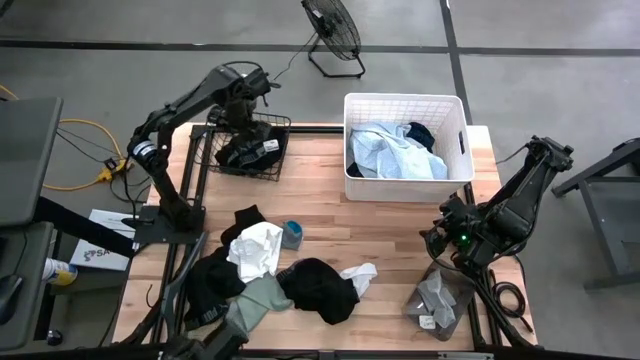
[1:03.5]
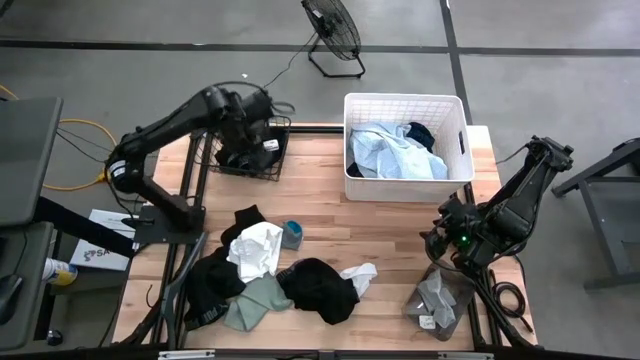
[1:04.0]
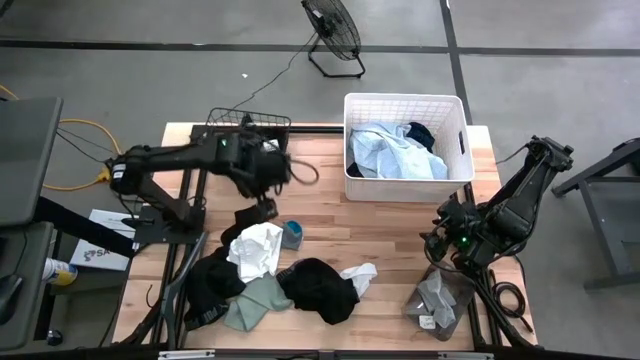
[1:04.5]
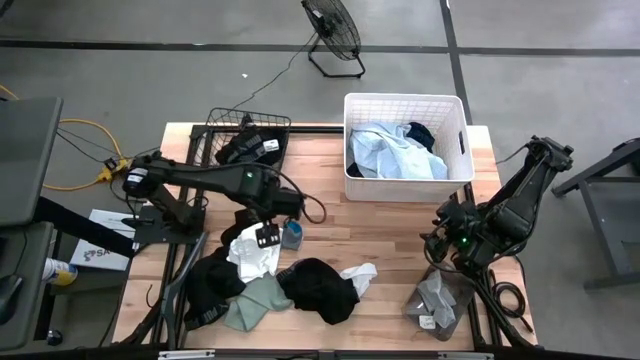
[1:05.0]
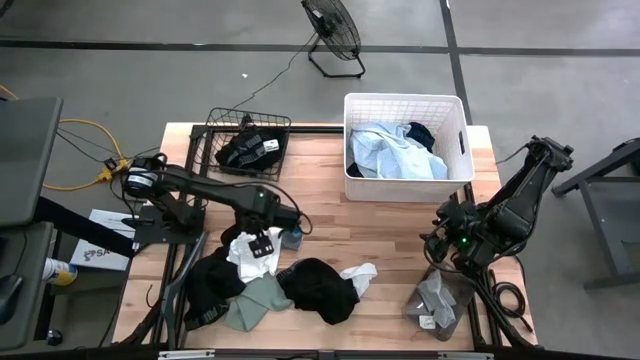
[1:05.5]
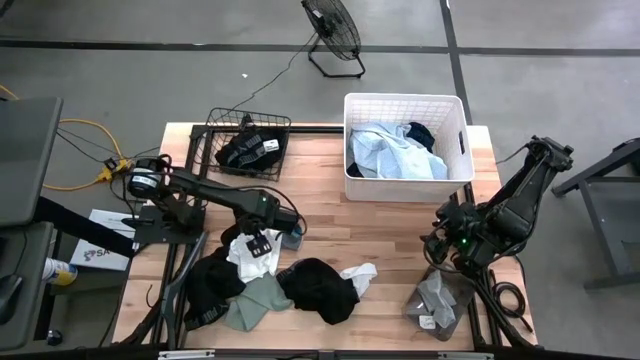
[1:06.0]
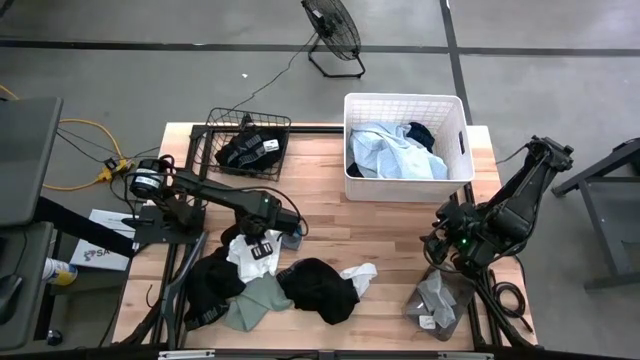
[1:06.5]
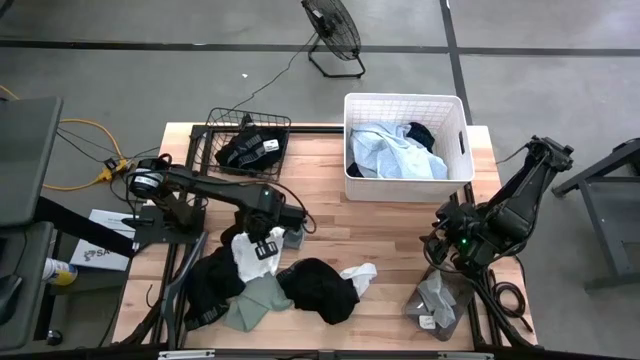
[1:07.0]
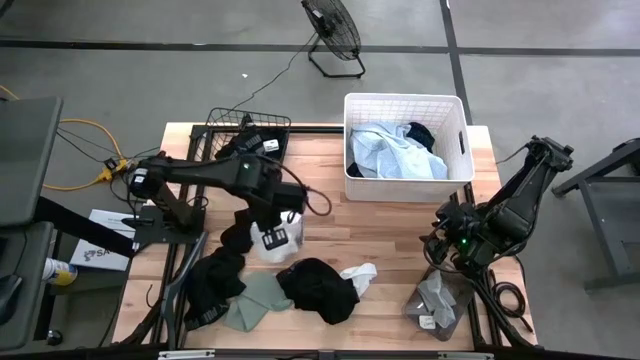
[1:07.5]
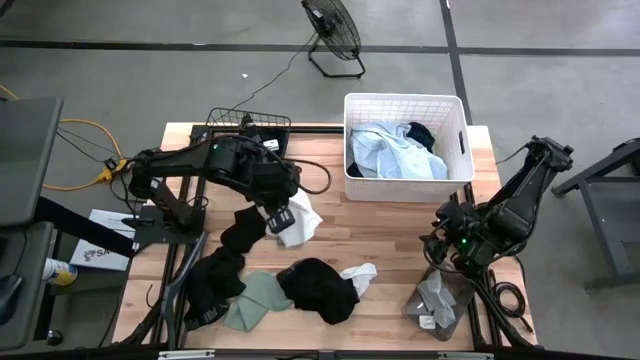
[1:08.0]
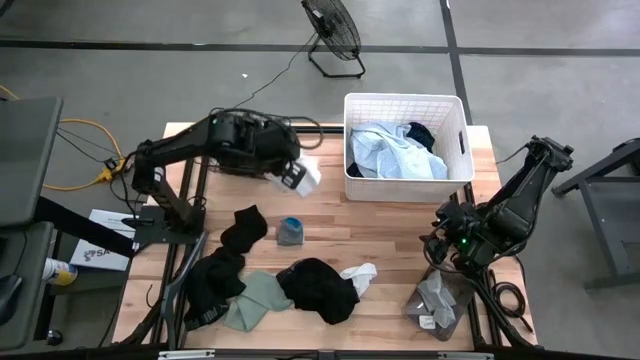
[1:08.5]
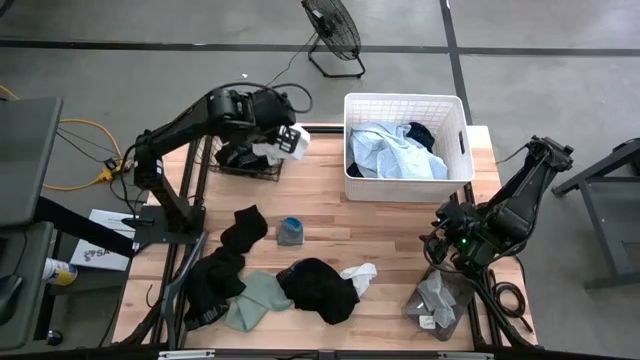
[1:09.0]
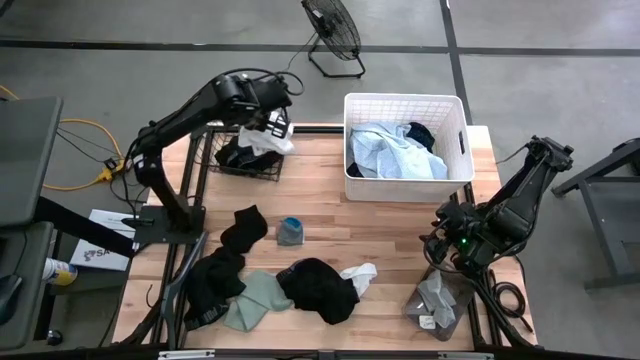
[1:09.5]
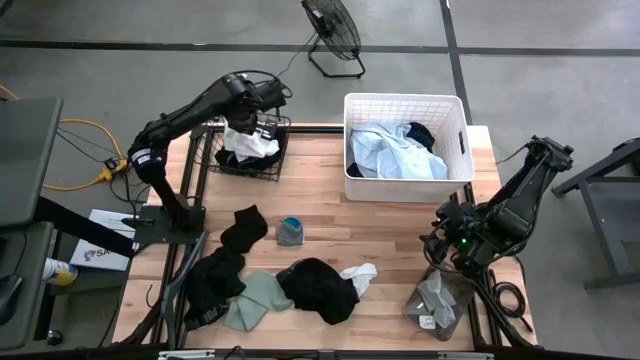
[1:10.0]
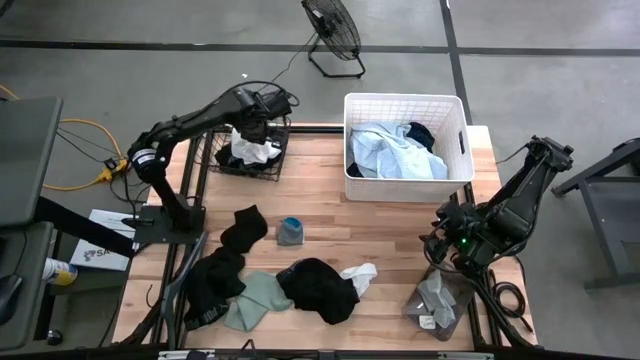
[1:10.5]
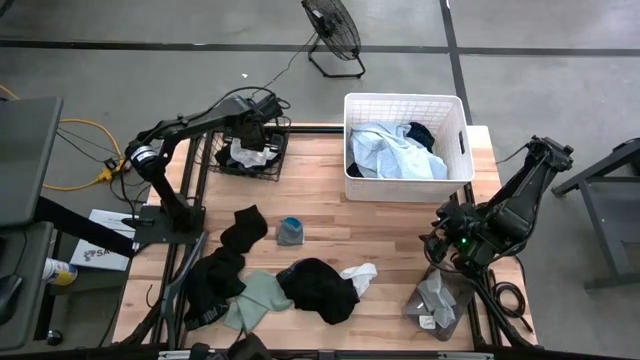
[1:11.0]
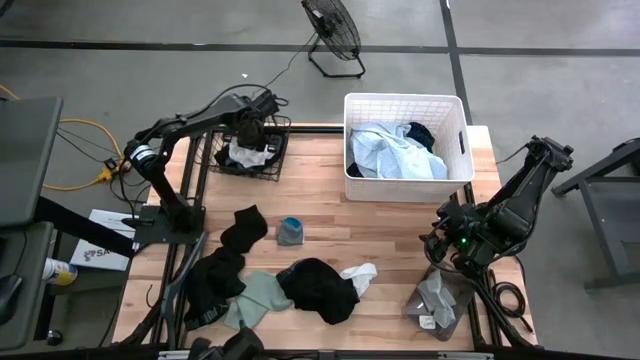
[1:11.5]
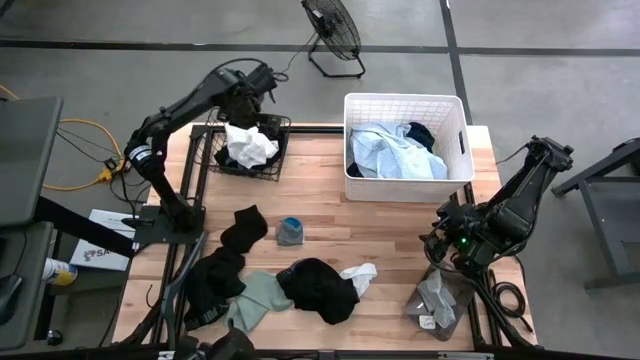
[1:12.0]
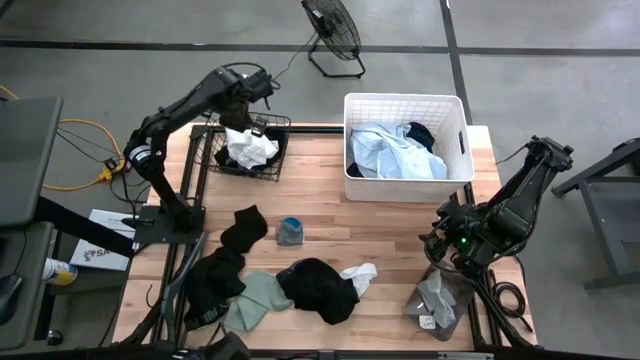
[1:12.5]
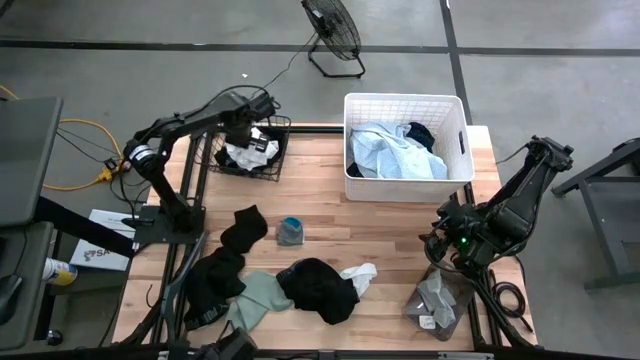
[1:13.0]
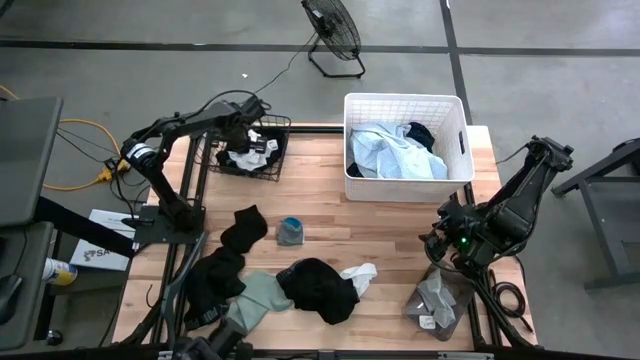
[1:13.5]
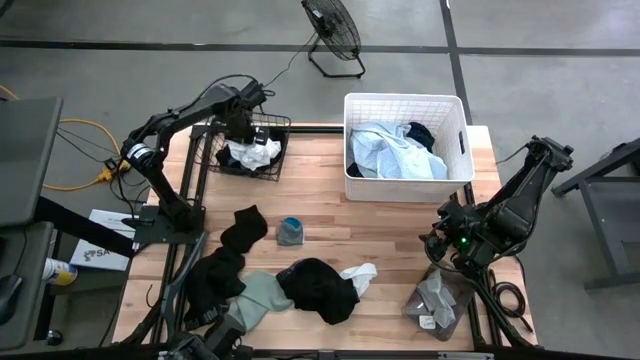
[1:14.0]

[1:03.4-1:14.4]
Task: Pick & Place Cloths
Put the white boxer shorts into the black wire basket

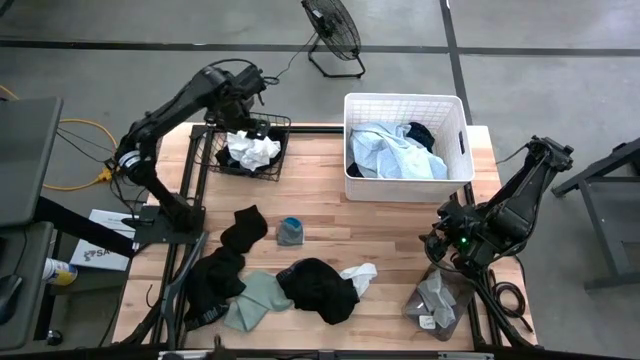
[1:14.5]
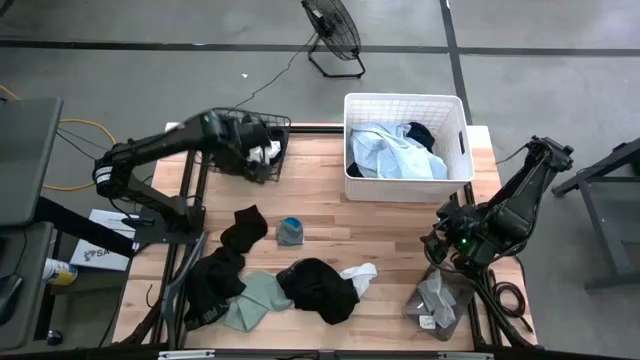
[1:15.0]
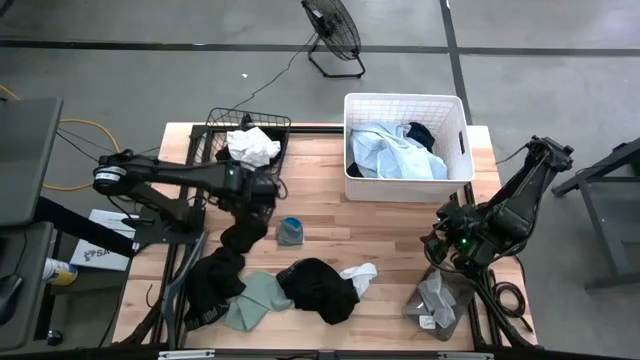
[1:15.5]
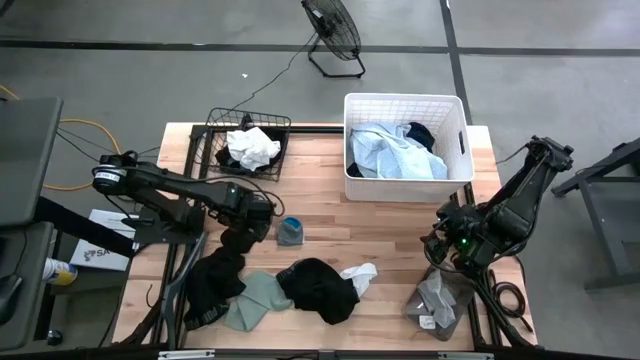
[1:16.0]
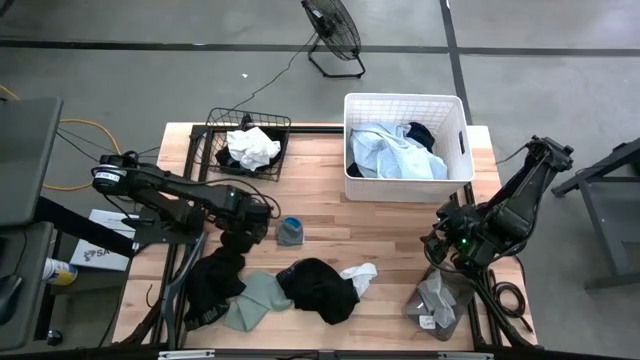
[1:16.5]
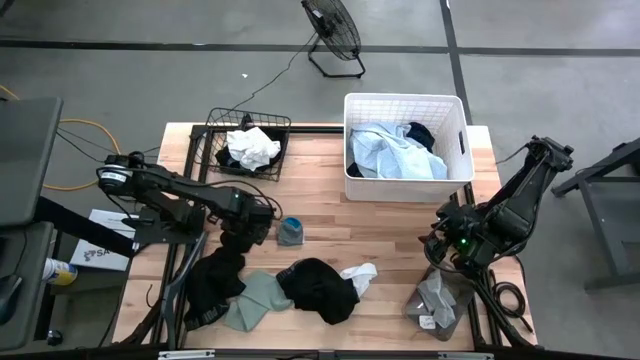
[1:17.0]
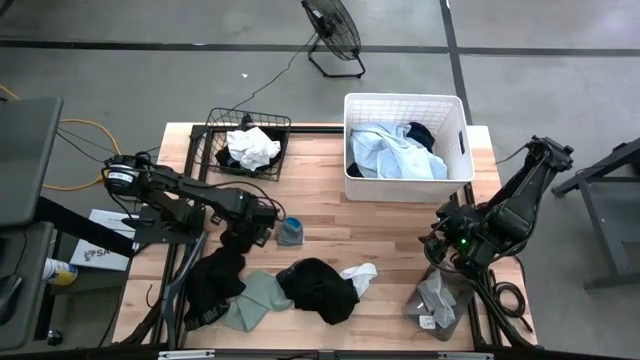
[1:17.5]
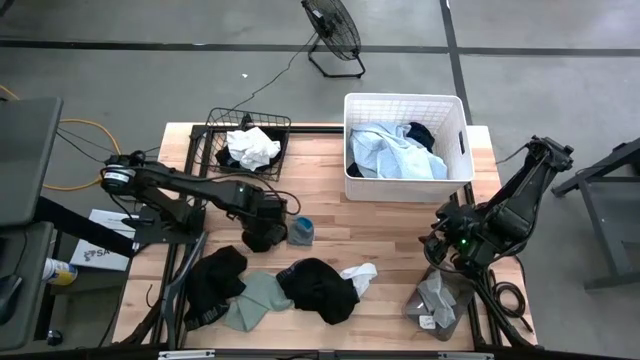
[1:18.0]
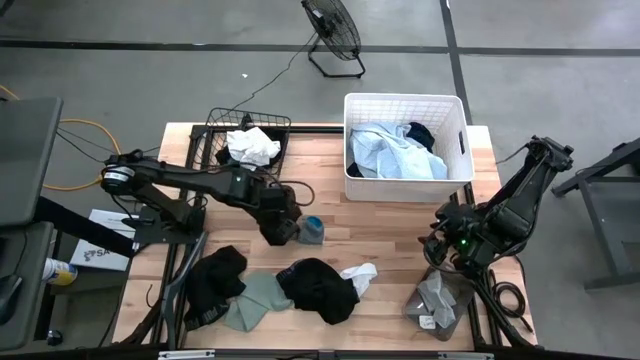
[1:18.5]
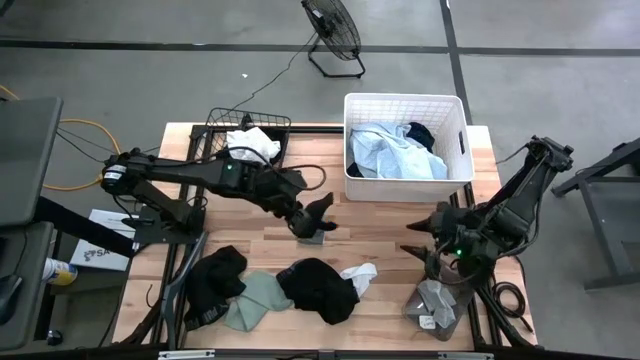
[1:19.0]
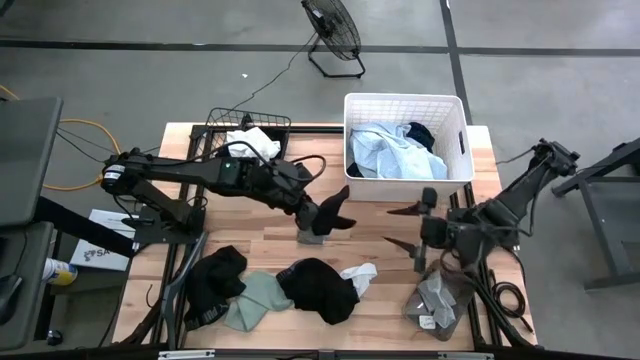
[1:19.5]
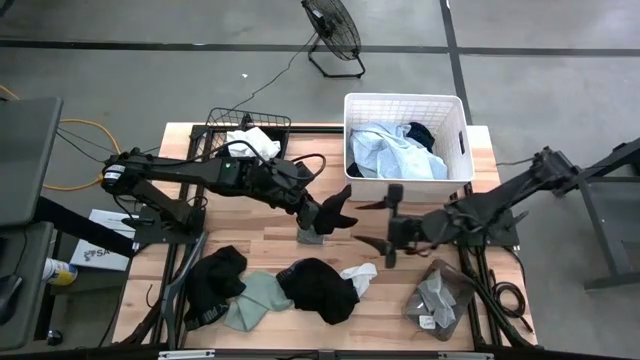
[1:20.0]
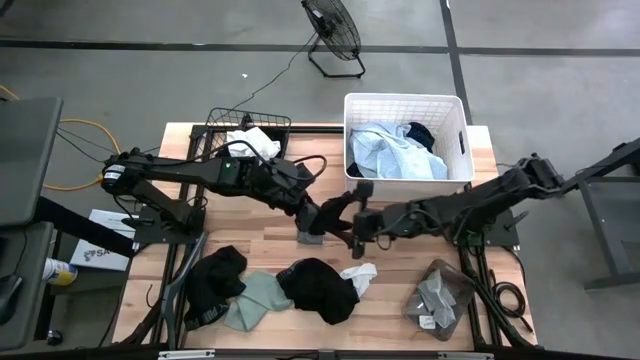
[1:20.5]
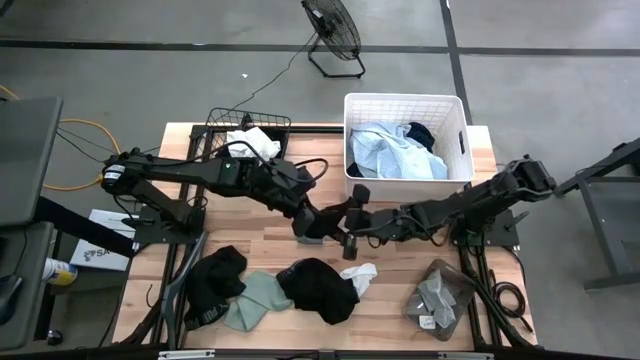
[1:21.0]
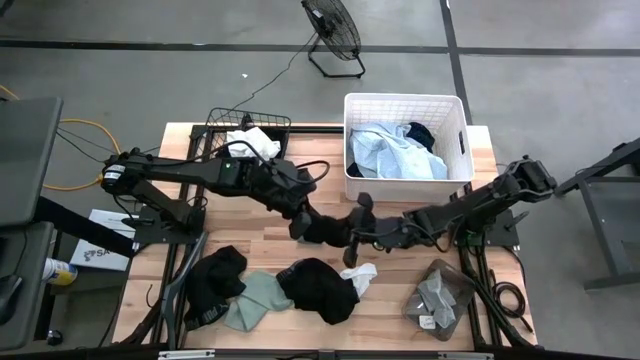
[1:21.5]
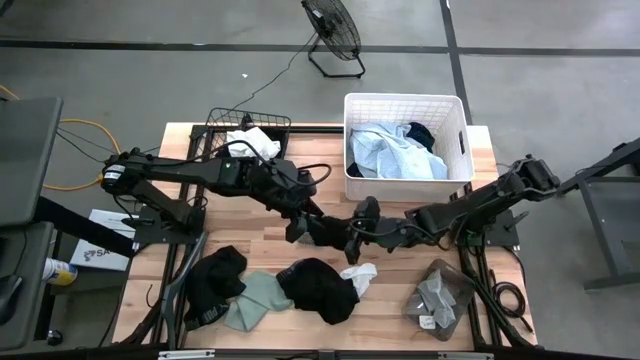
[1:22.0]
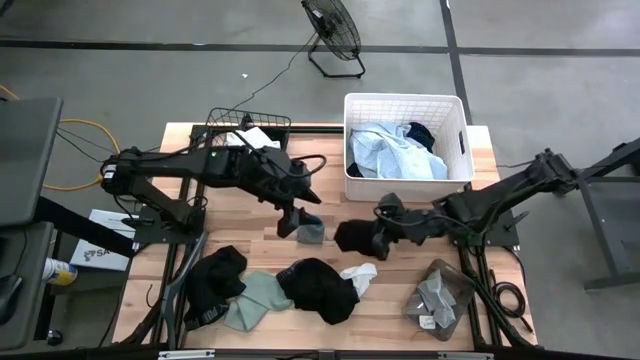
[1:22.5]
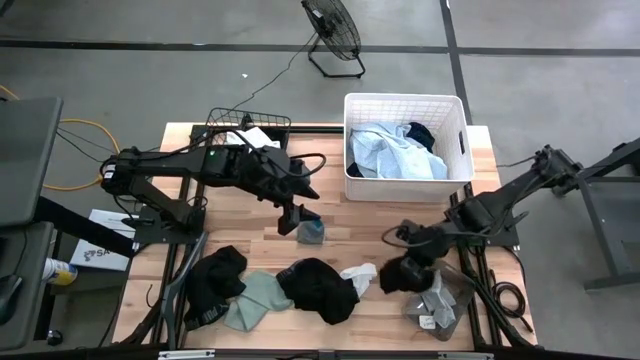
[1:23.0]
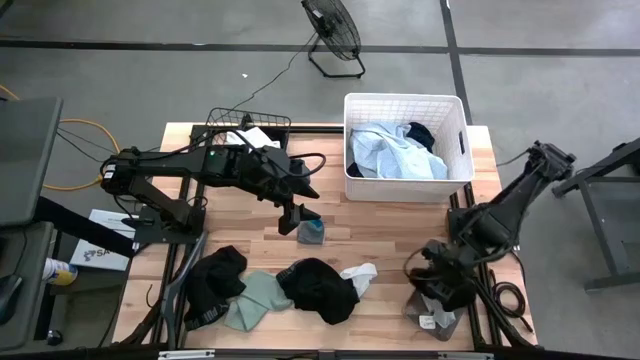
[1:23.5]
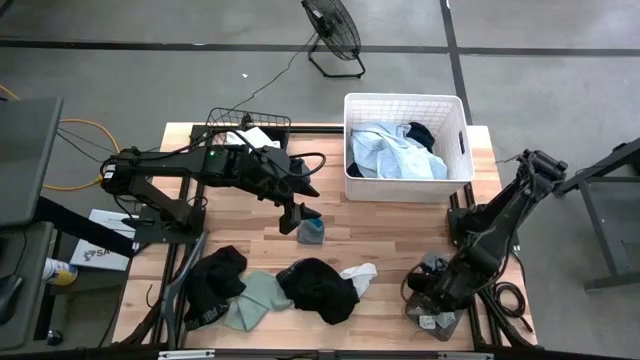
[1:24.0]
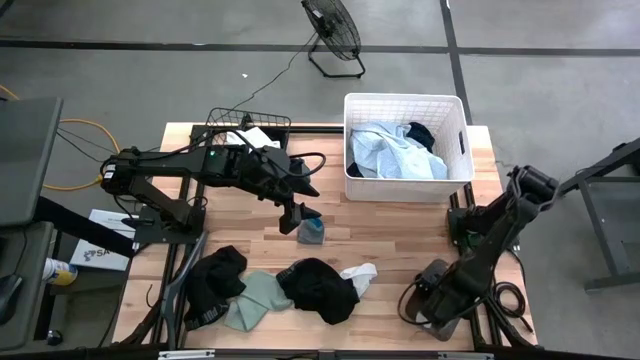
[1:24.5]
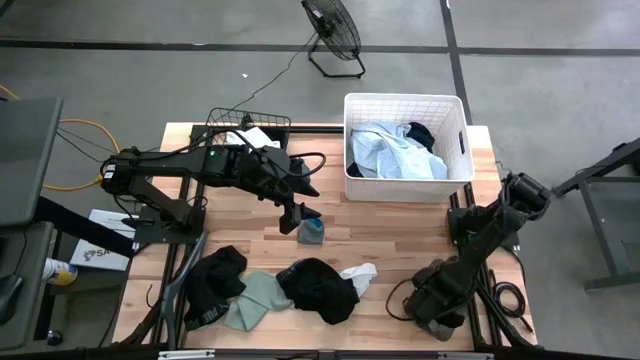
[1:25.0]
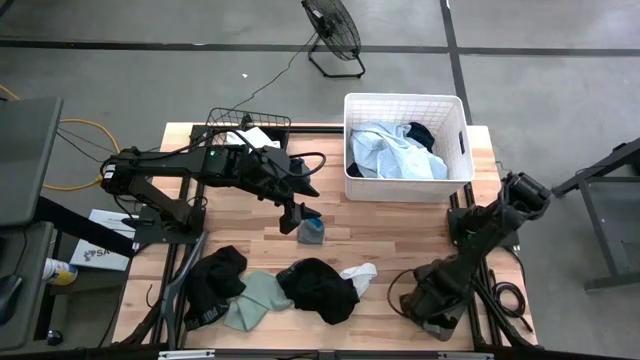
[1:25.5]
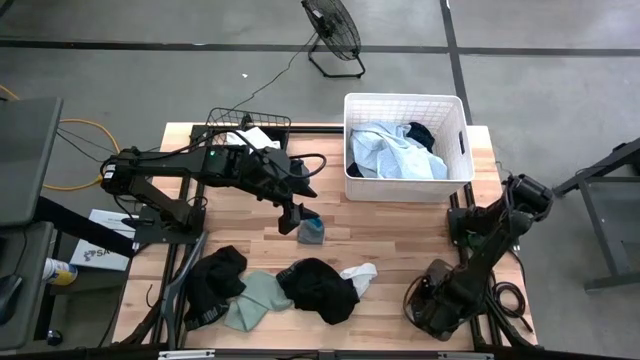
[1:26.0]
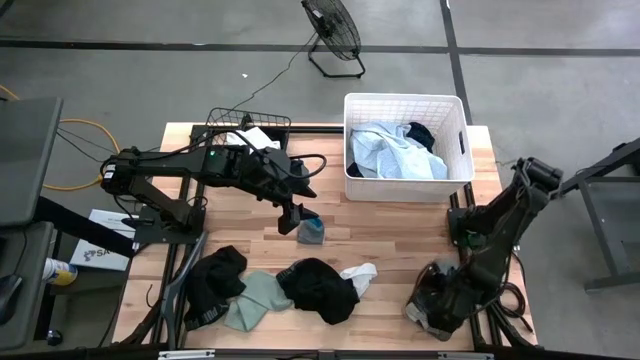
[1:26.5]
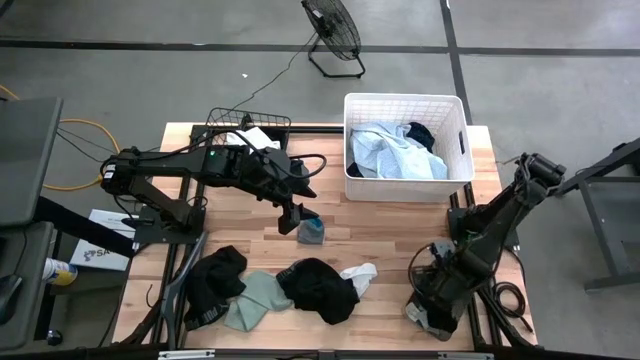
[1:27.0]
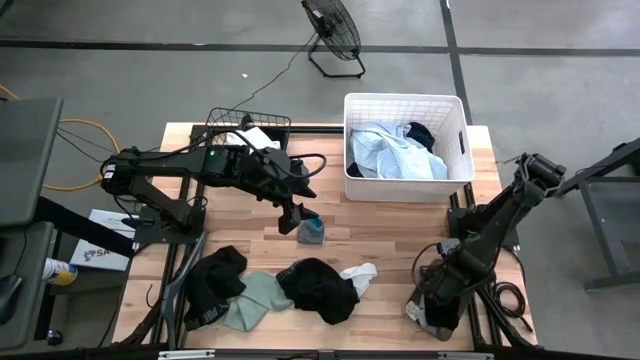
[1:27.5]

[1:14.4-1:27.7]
Put the black sock into the black bin
